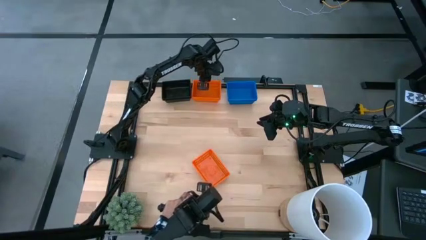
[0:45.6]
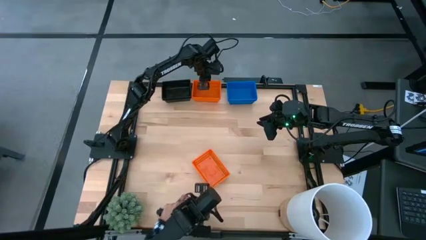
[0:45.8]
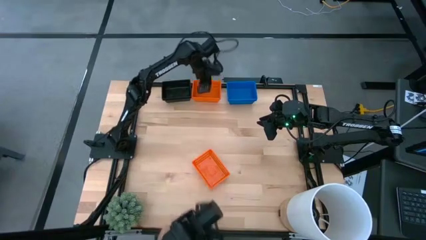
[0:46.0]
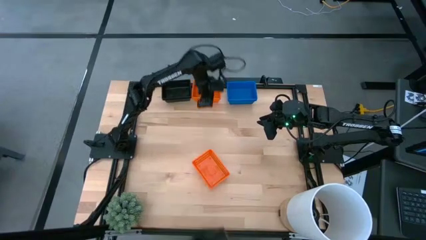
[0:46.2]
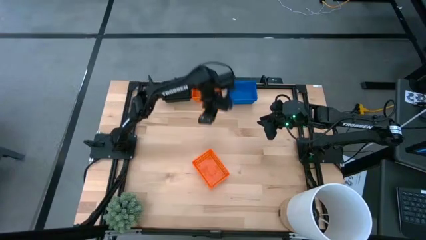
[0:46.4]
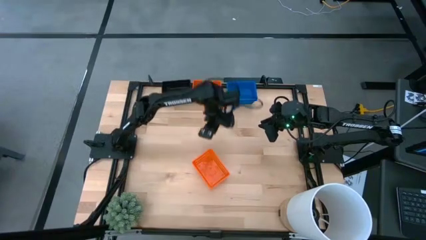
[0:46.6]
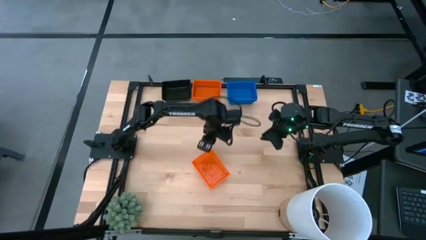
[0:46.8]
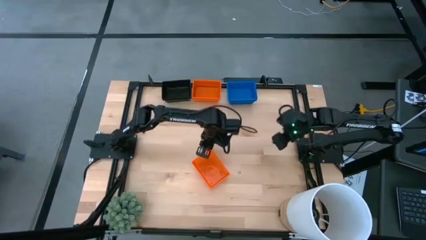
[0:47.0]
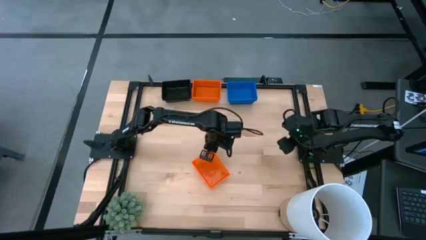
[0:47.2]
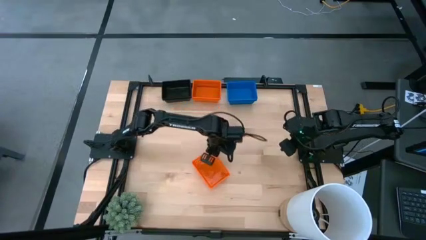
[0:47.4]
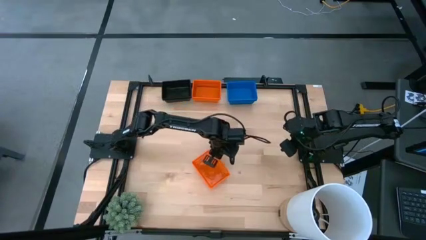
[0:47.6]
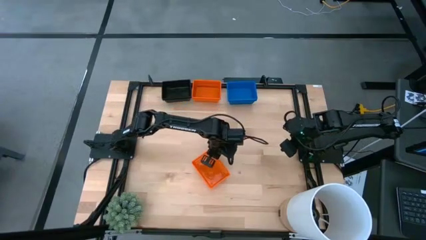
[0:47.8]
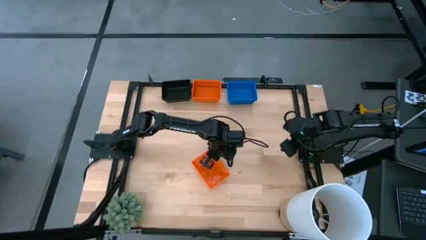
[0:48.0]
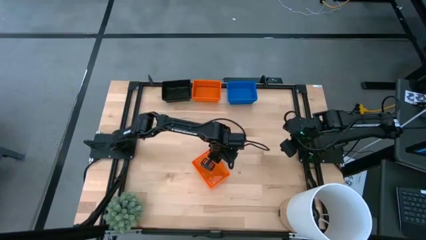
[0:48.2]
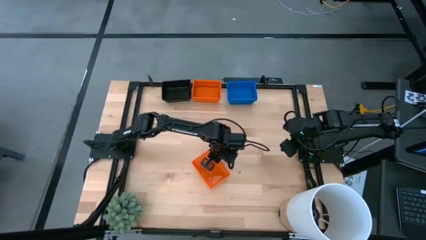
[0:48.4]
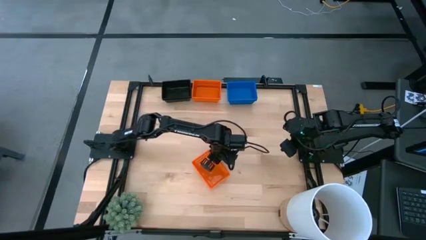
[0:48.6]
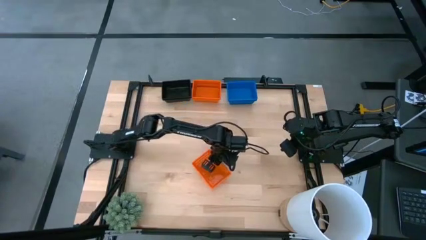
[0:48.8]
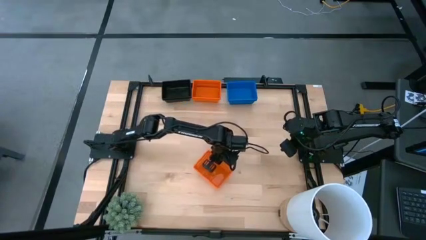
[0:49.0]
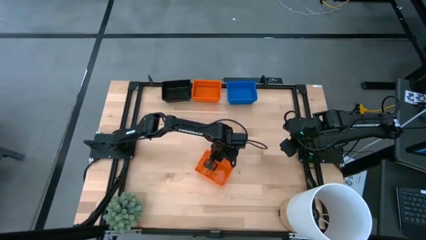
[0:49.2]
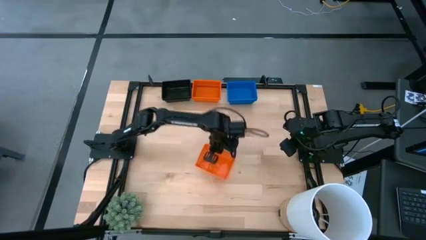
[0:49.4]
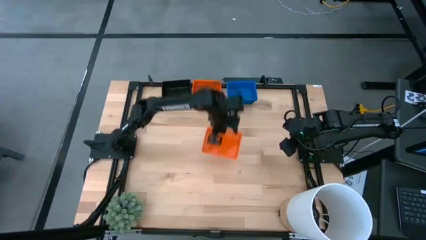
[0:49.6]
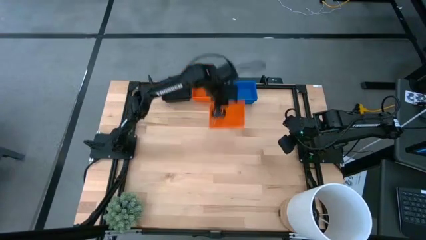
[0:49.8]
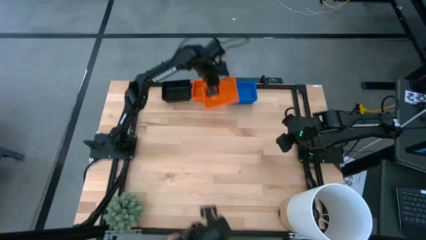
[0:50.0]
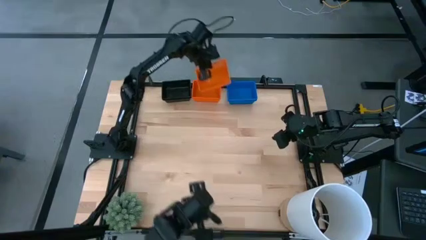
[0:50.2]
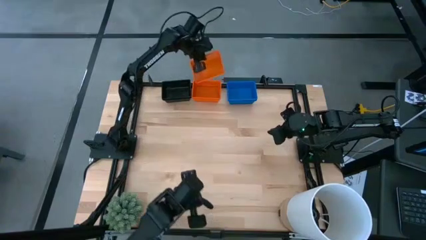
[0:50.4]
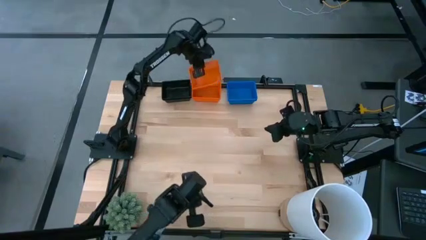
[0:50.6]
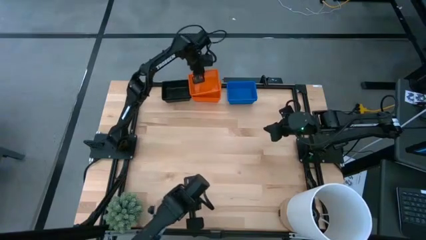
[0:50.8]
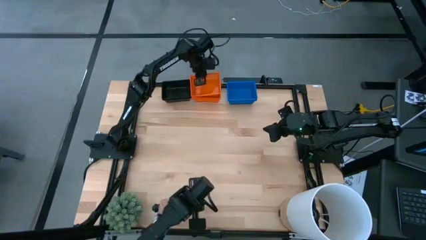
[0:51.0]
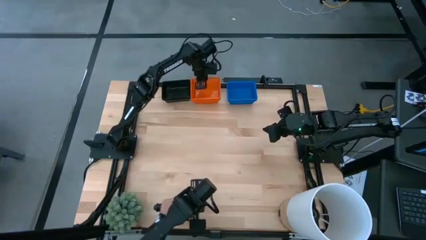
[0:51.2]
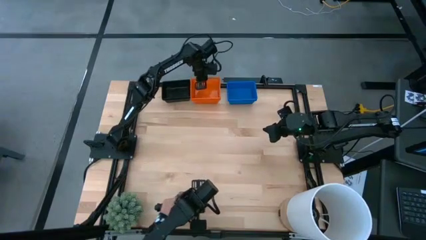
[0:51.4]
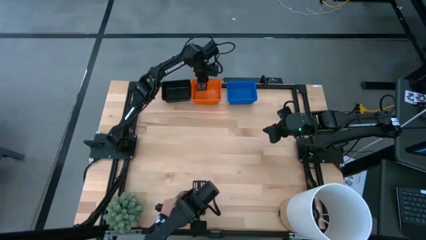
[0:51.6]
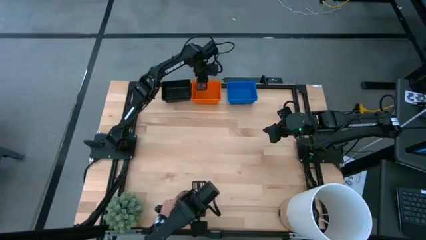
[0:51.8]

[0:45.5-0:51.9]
Stack the bottom orange bin on top of the top orange bin

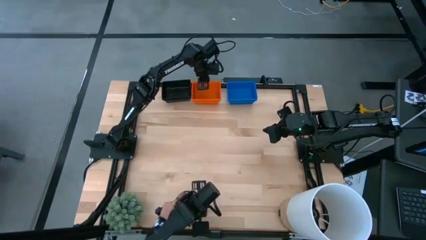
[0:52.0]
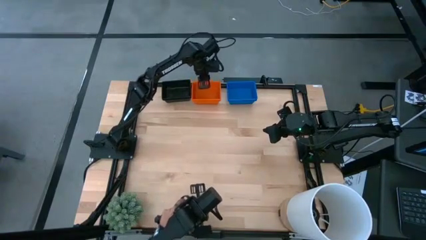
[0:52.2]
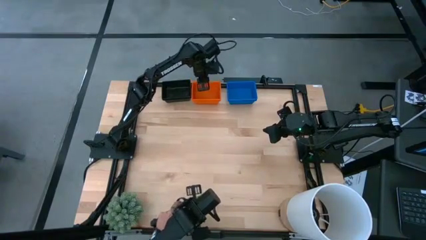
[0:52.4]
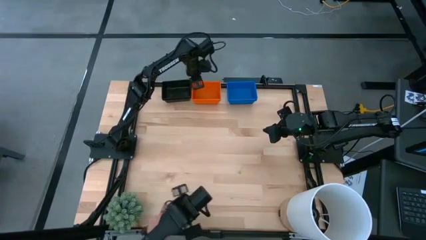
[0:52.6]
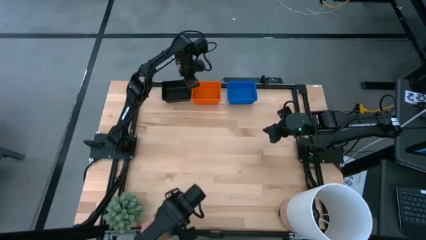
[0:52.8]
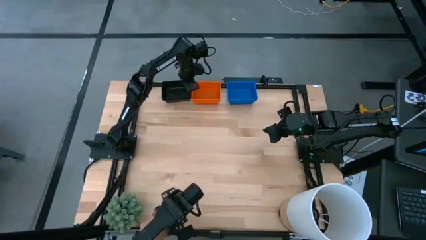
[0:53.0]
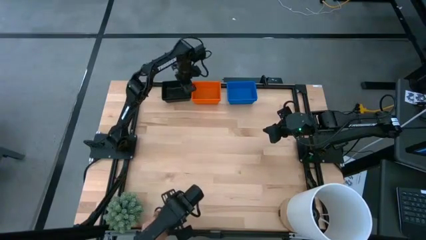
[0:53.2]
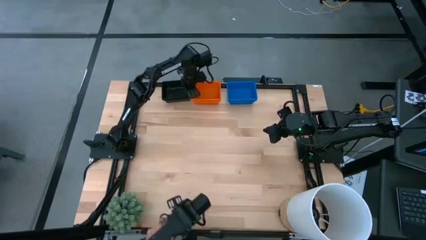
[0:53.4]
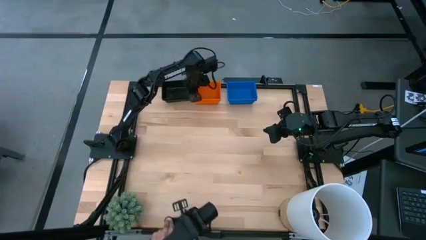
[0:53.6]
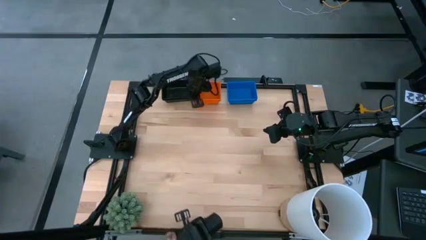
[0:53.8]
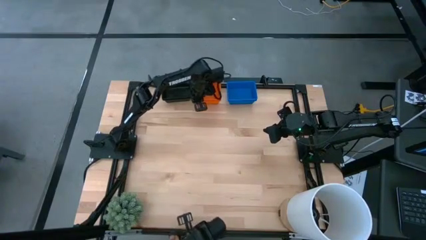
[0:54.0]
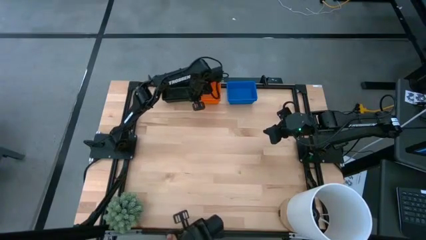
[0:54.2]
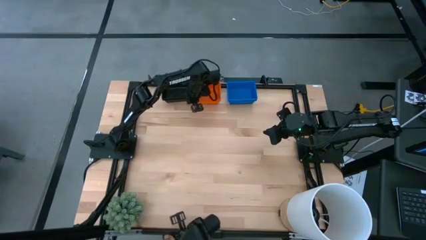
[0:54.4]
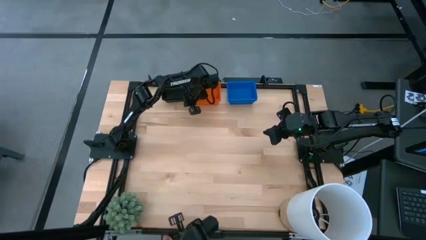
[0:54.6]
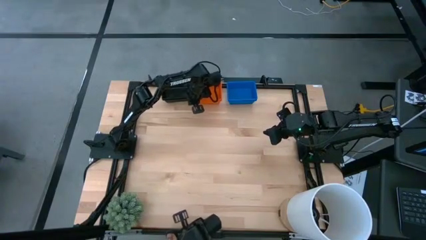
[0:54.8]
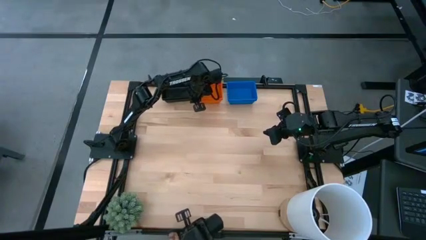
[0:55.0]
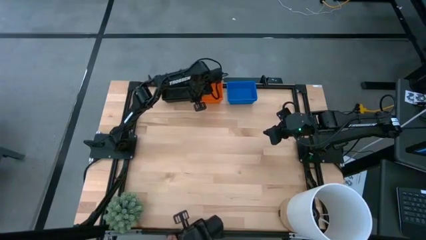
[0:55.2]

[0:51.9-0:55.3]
Adjust the stacked orange bins

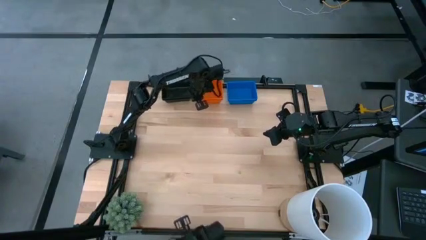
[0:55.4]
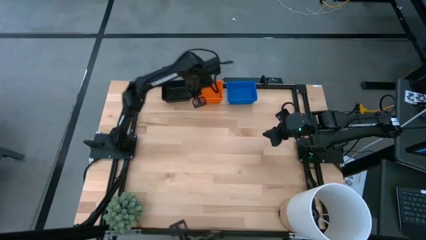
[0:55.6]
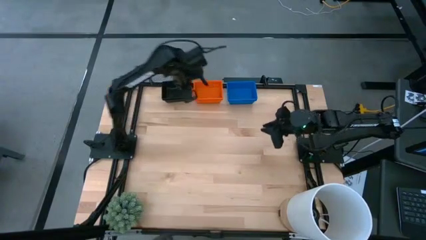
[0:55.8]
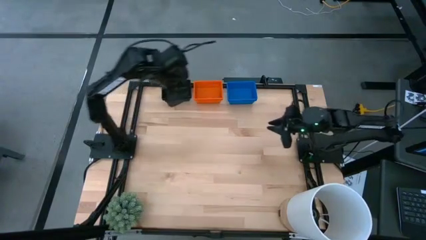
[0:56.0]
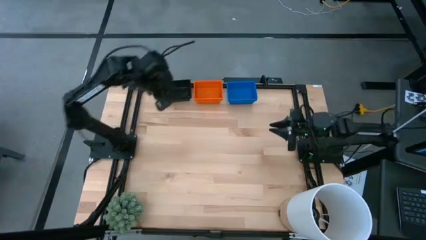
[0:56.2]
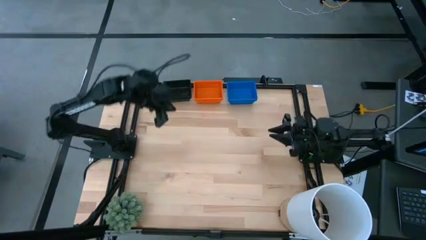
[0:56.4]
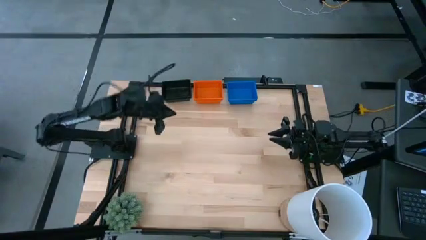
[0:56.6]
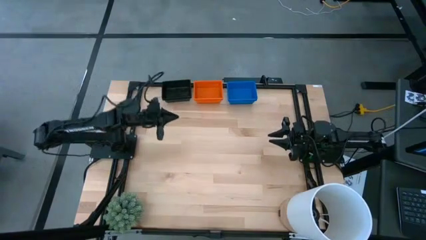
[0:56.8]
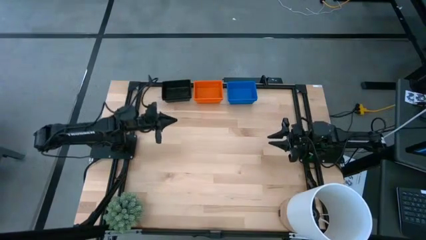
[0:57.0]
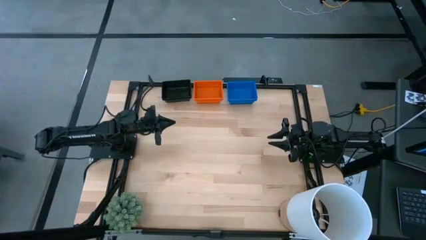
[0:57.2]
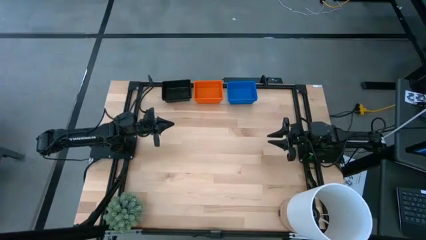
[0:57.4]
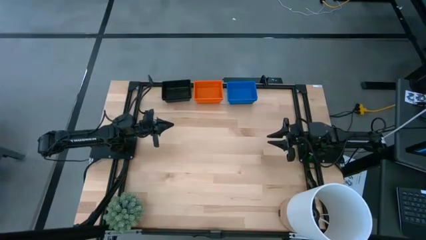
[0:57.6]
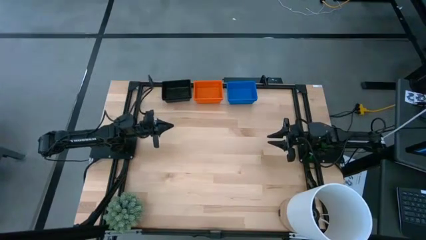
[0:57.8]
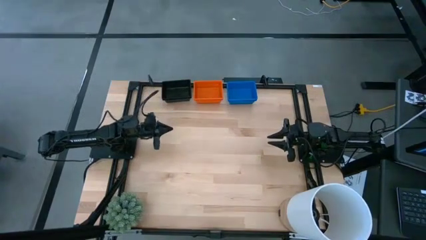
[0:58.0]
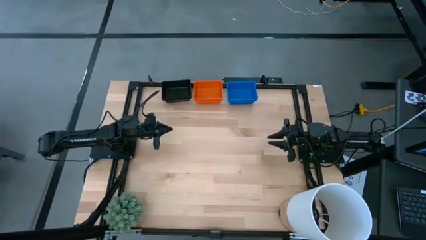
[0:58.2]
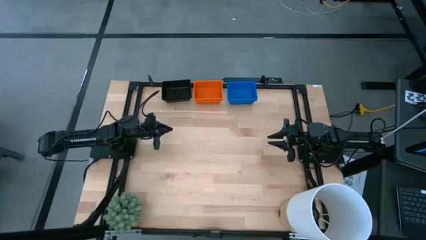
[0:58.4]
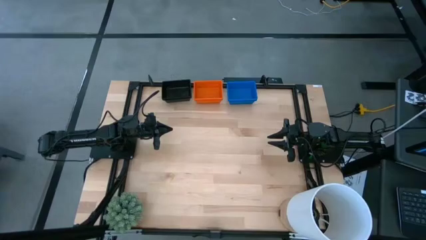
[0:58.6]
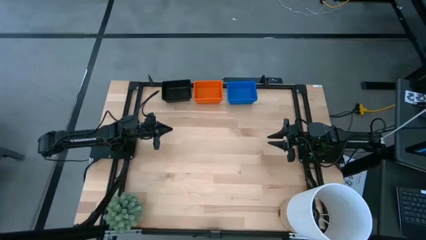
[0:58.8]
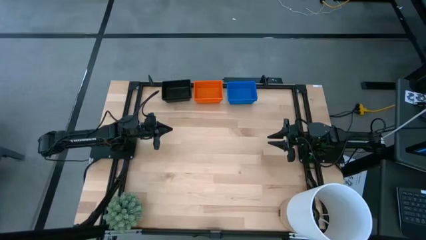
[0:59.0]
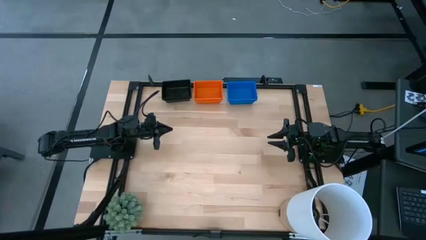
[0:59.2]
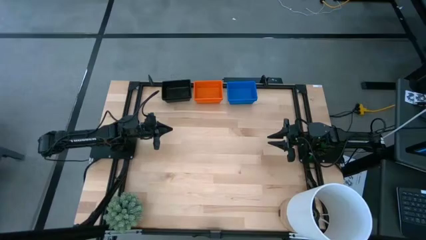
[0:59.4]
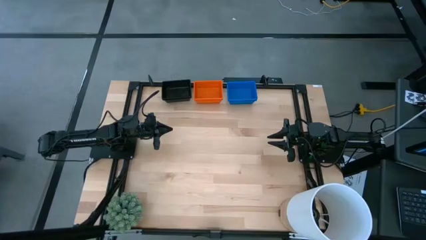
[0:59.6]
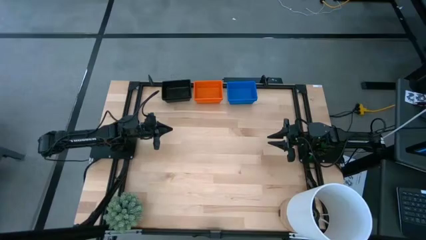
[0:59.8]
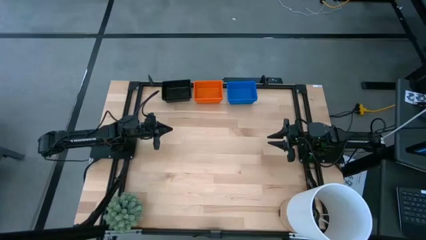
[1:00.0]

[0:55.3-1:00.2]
Return to Home Position
